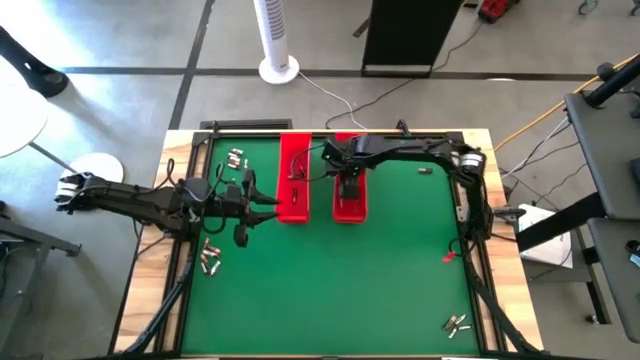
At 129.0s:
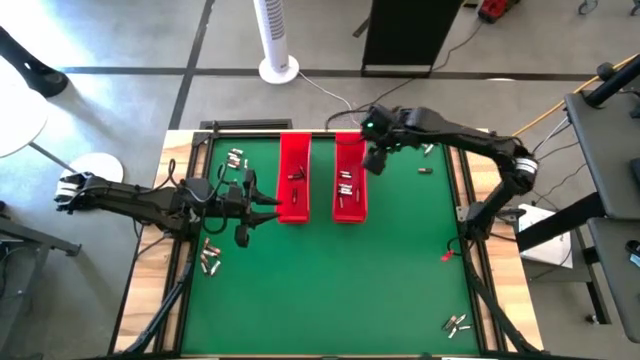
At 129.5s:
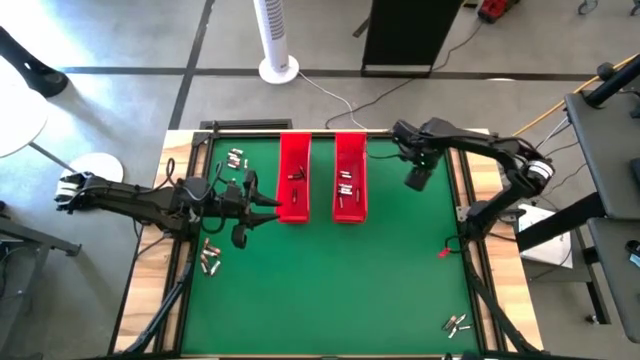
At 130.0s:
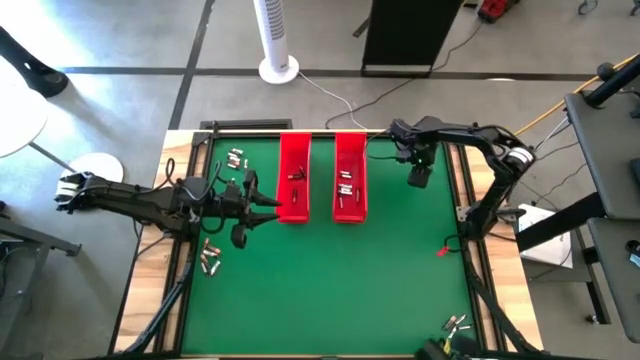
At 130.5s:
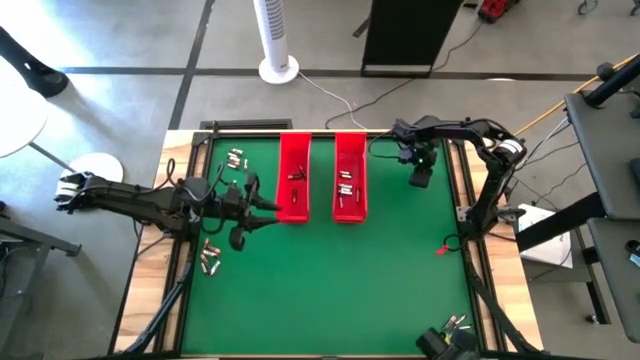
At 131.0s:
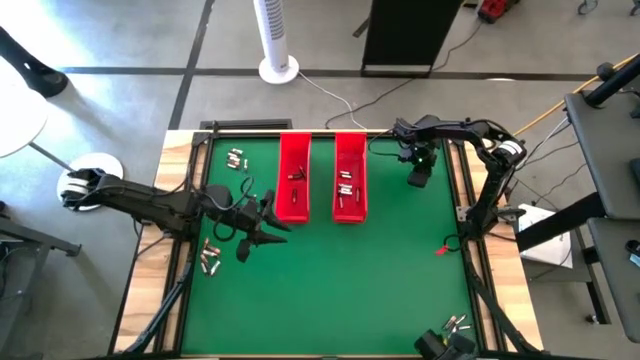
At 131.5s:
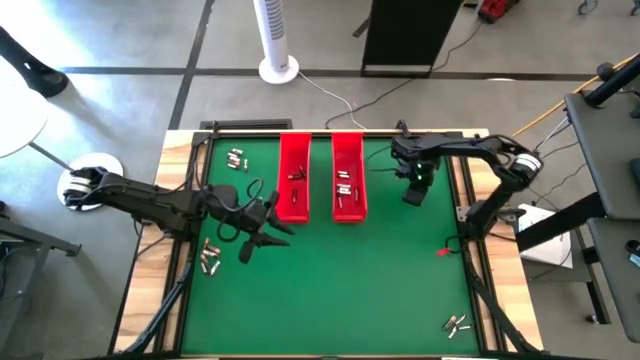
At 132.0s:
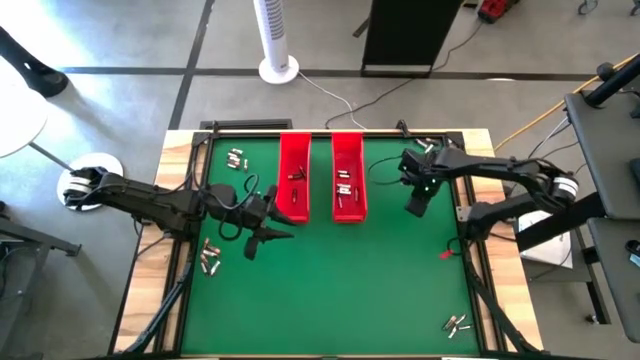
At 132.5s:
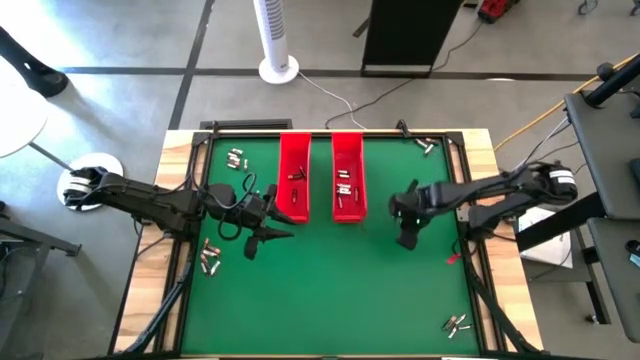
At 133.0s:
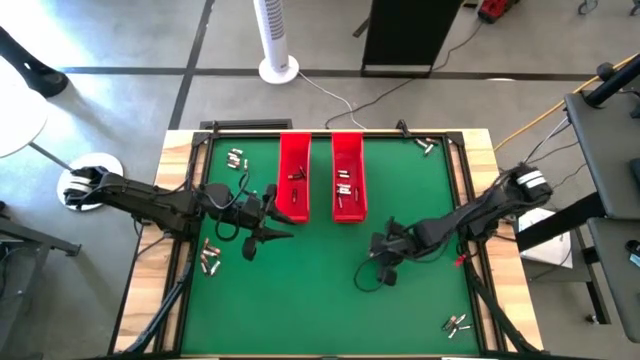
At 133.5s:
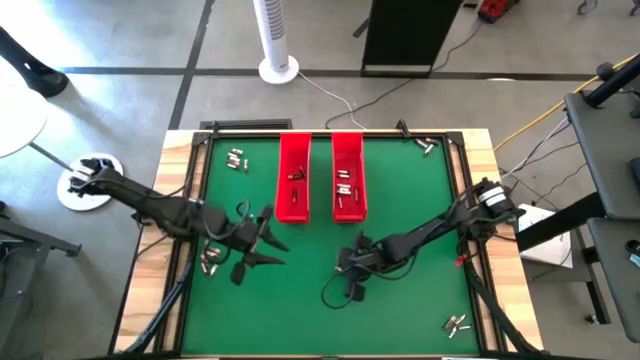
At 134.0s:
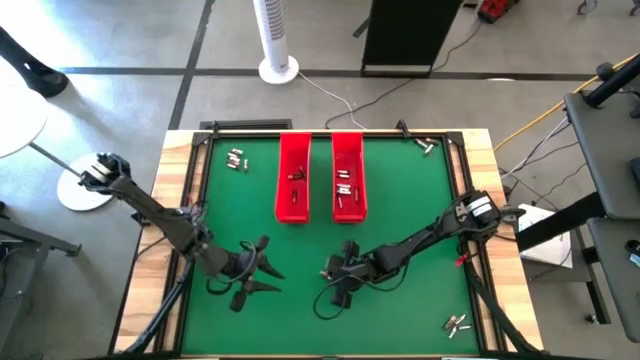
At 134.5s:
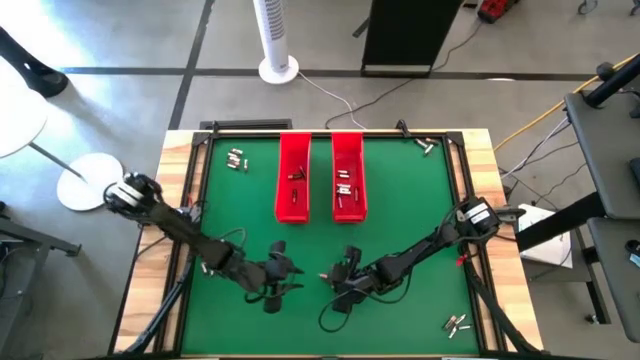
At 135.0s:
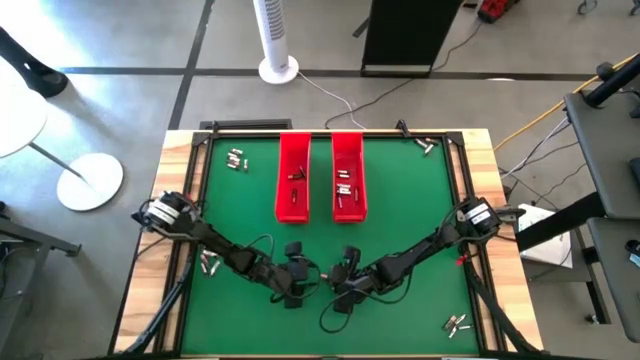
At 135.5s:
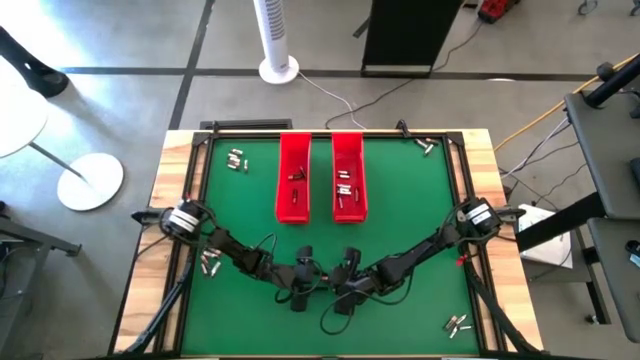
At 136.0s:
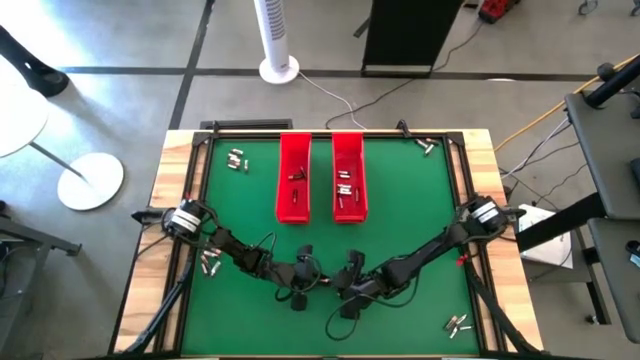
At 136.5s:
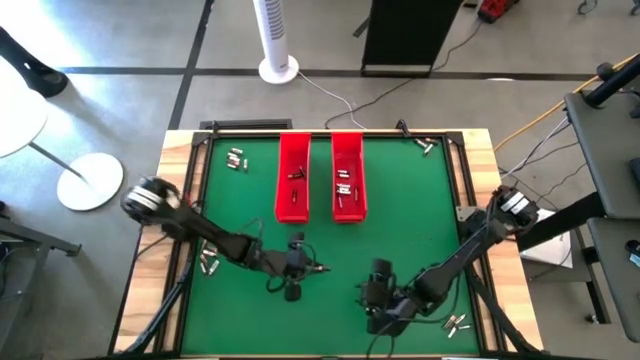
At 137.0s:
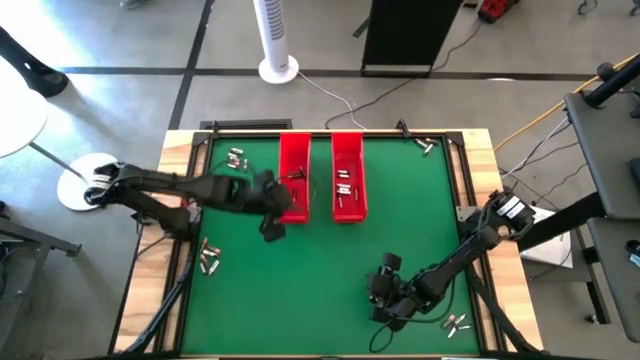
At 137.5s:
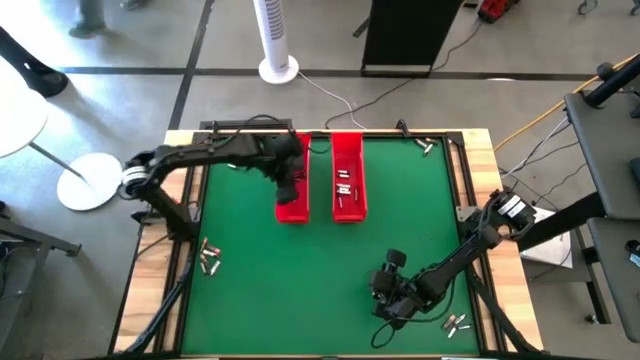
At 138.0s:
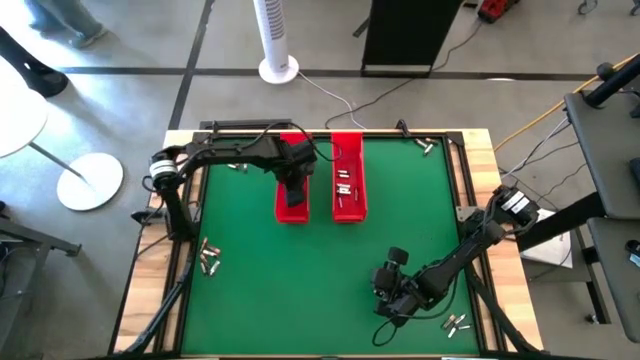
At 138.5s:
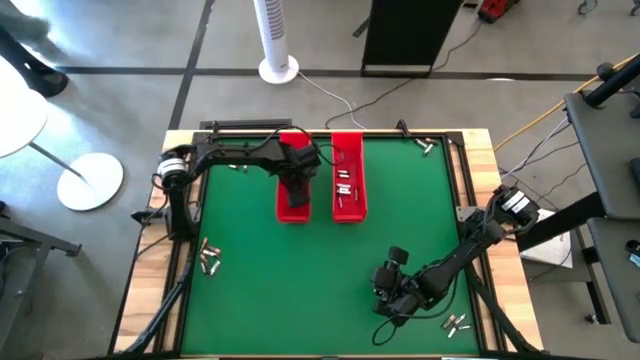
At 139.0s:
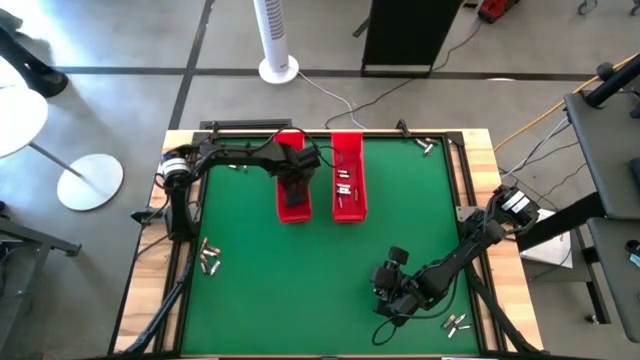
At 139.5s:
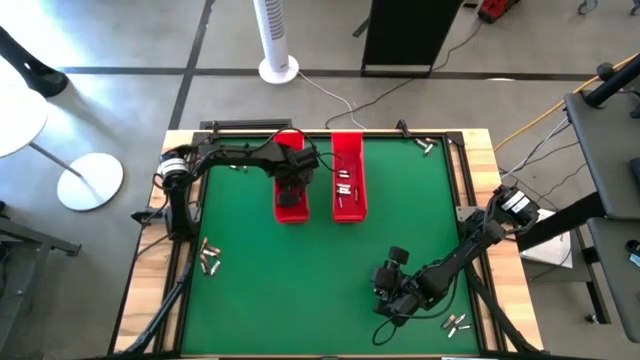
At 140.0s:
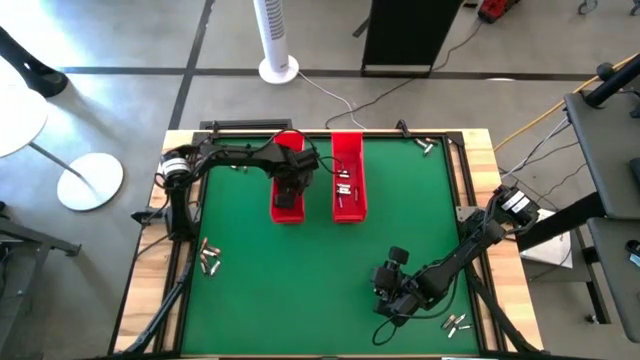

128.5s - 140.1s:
Task: Sort batteries
Put the black battery into the left red bin

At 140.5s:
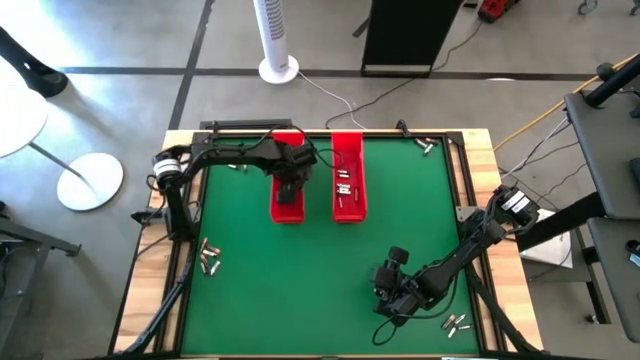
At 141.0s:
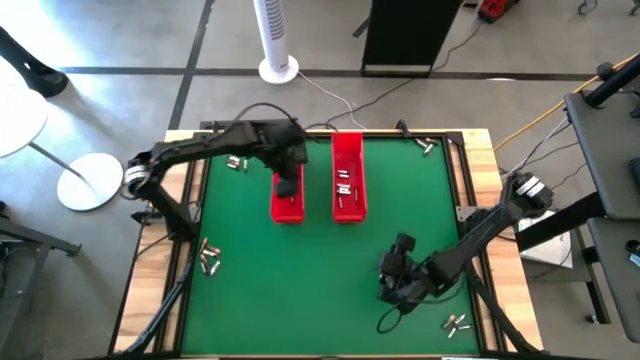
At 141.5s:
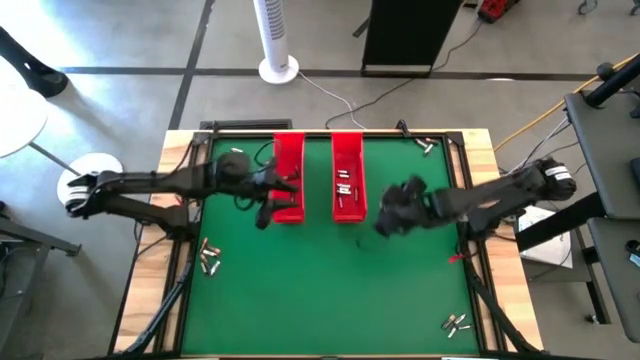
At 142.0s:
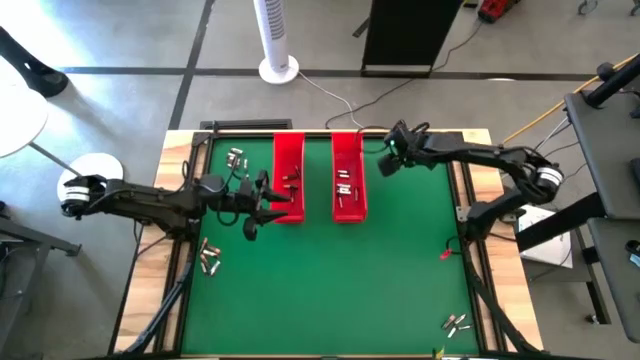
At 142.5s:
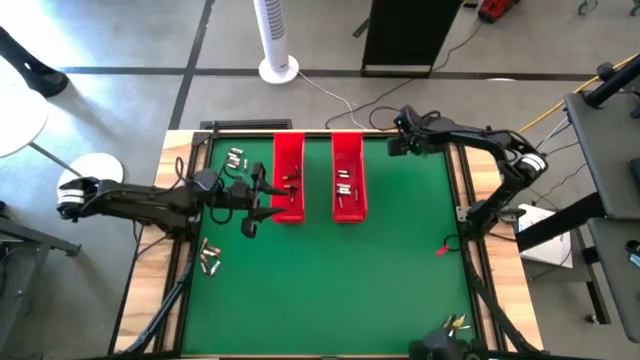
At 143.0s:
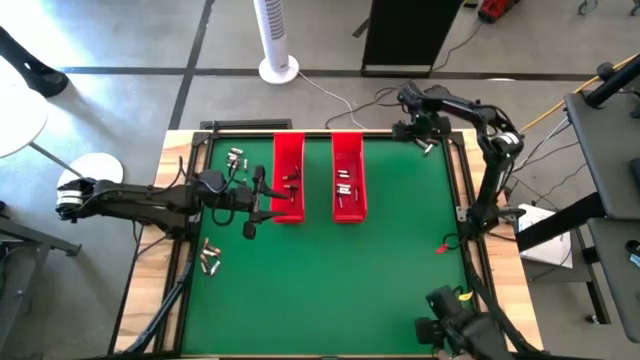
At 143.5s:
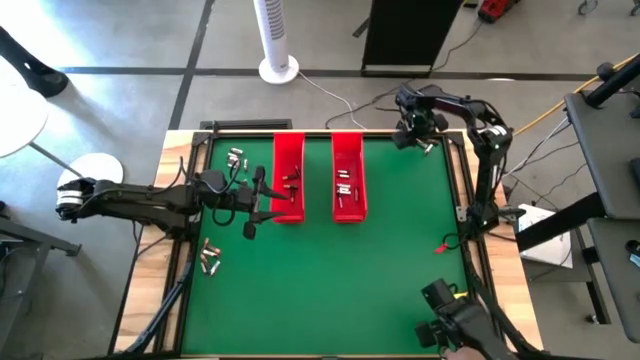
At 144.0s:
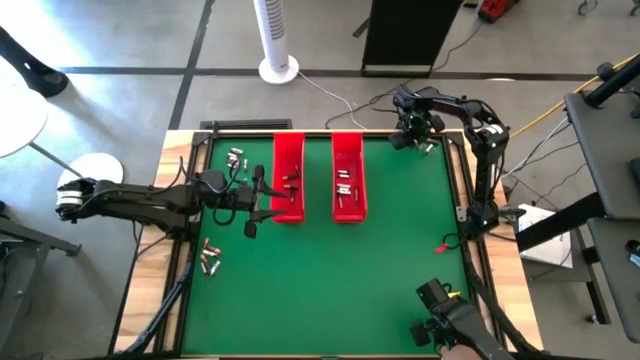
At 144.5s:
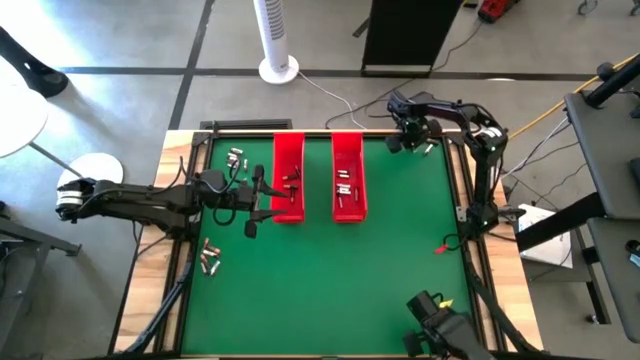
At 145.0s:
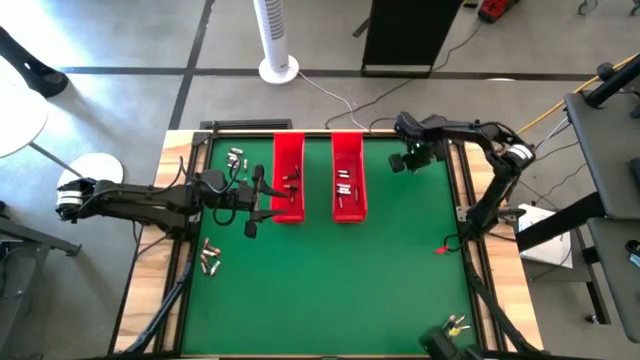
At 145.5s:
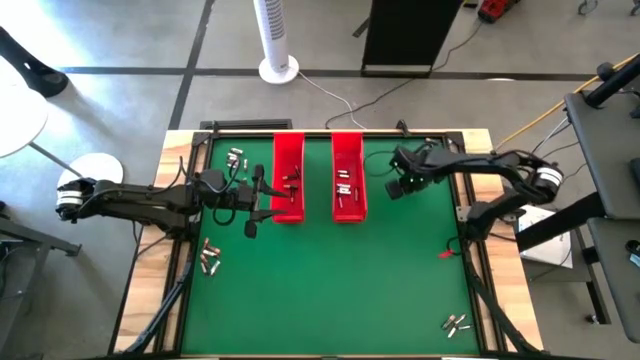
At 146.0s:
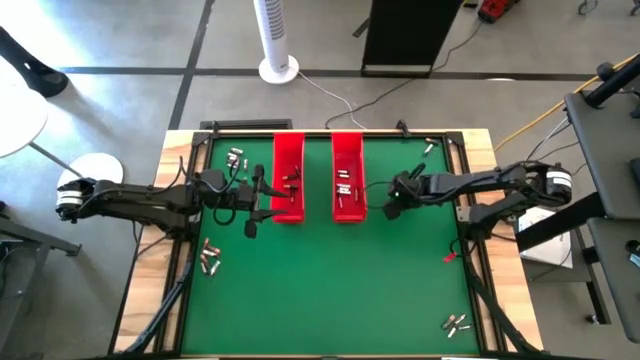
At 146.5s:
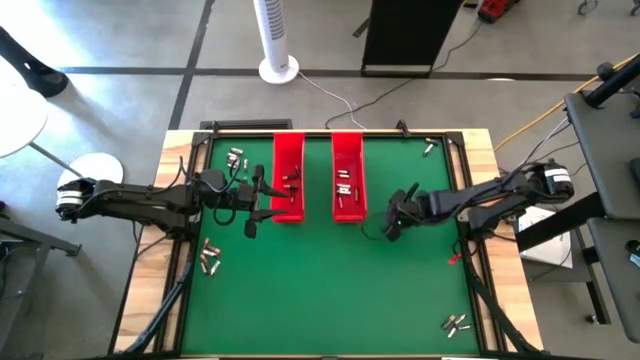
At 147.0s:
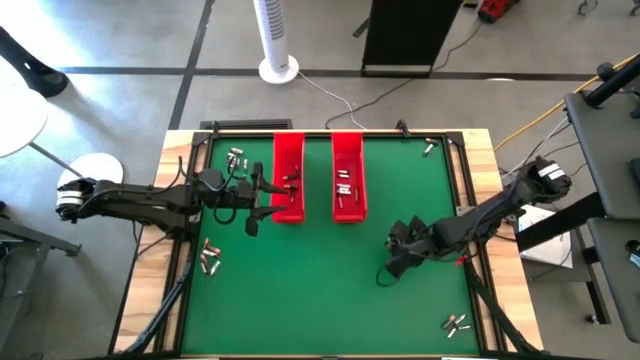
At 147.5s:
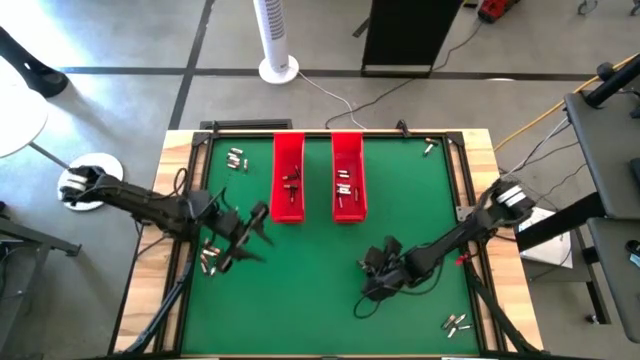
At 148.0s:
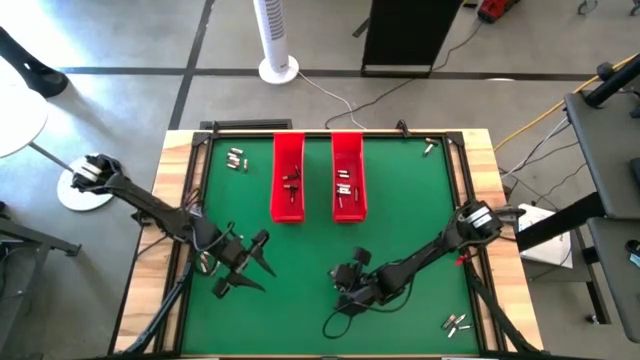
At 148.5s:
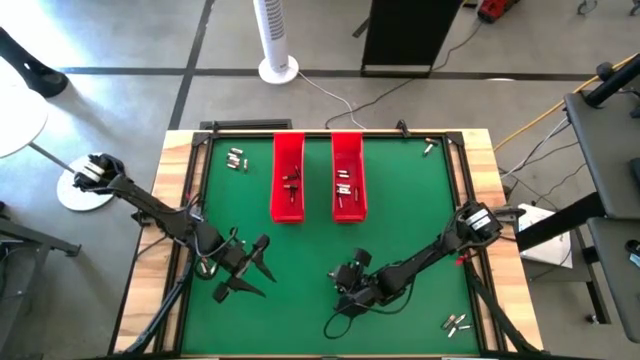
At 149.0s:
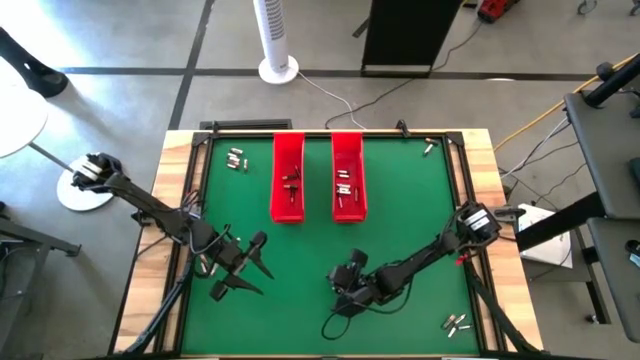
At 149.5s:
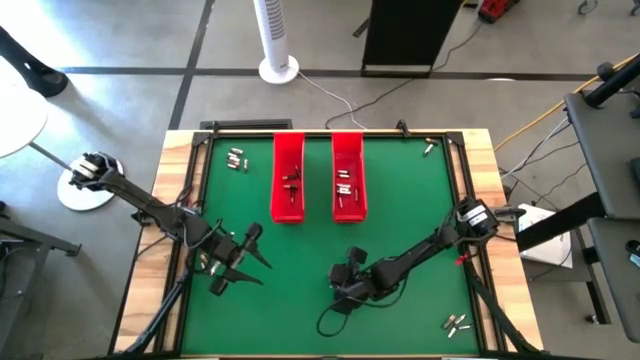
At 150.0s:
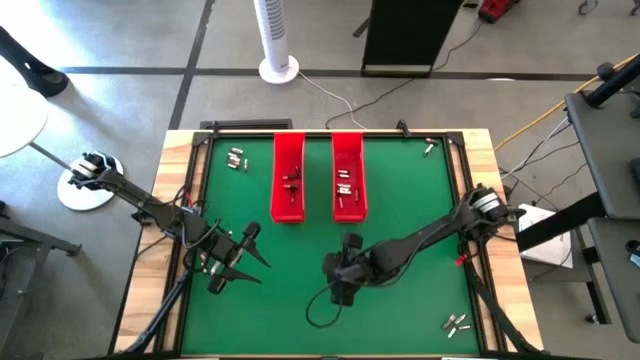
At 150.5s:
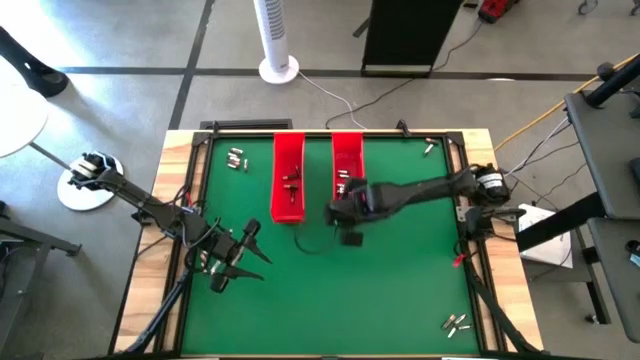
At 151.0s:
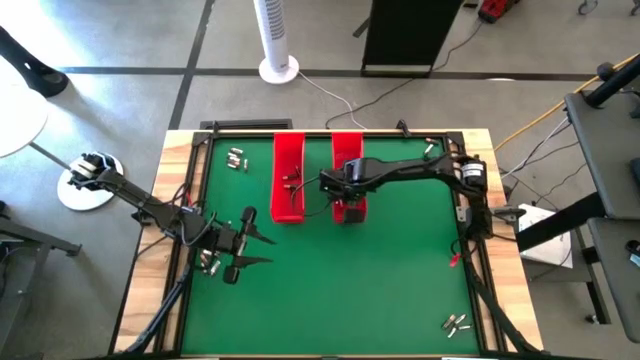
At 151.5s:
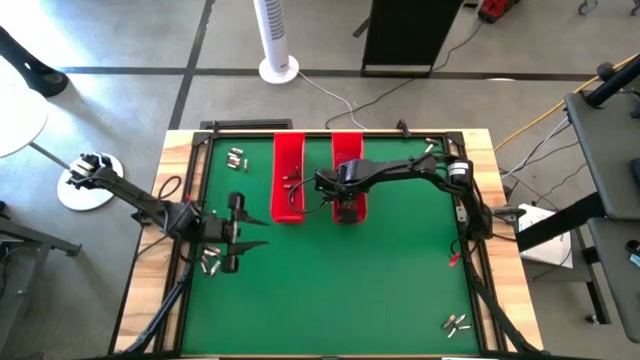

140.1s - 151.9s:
Put the silver battery into the right red bin
